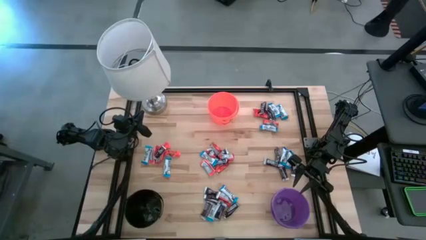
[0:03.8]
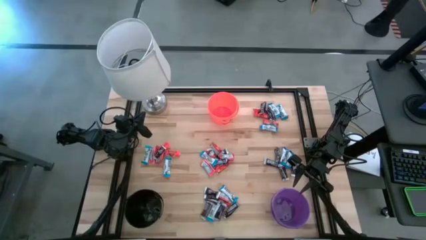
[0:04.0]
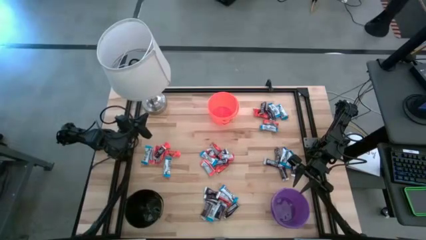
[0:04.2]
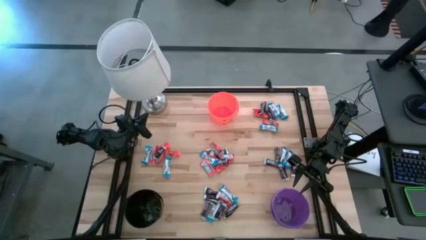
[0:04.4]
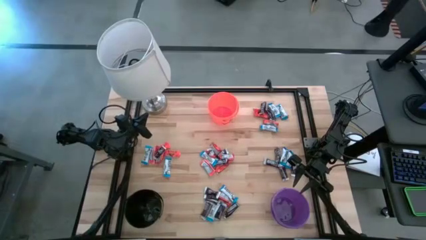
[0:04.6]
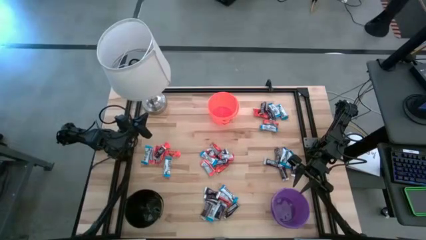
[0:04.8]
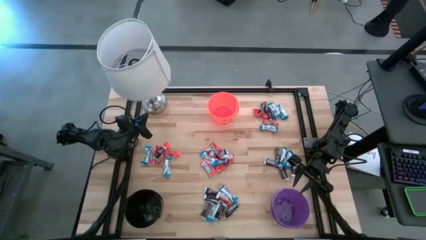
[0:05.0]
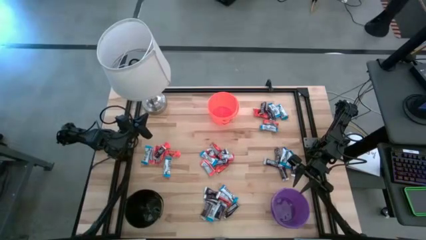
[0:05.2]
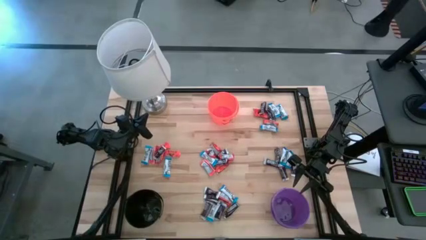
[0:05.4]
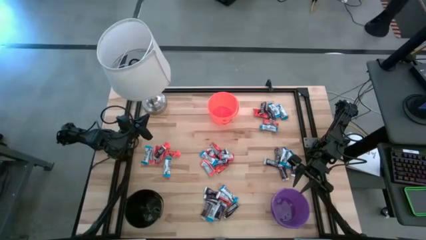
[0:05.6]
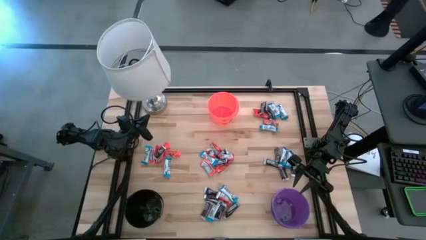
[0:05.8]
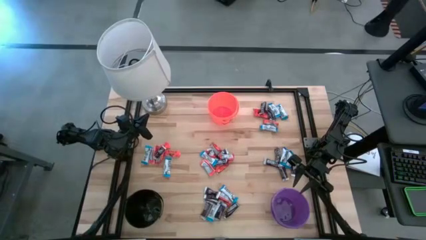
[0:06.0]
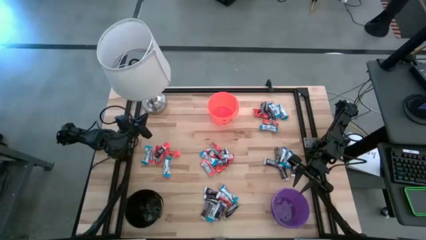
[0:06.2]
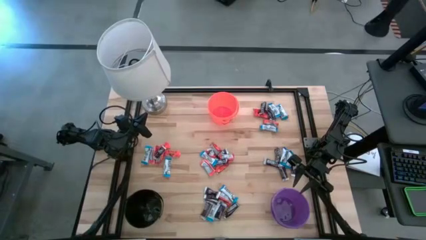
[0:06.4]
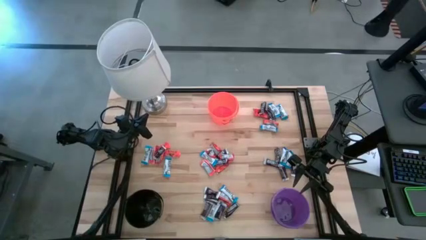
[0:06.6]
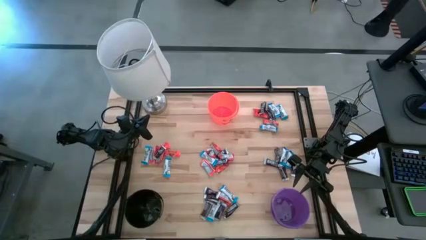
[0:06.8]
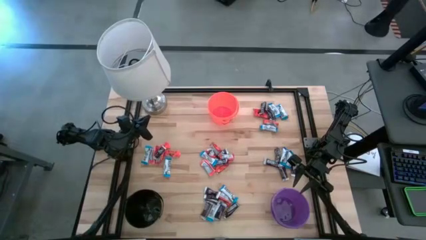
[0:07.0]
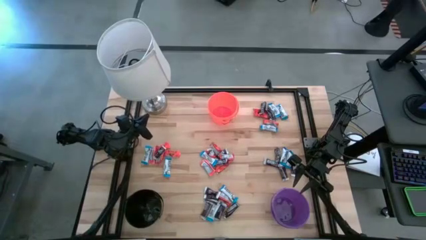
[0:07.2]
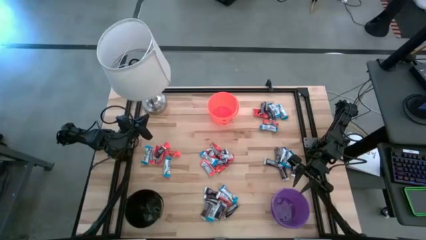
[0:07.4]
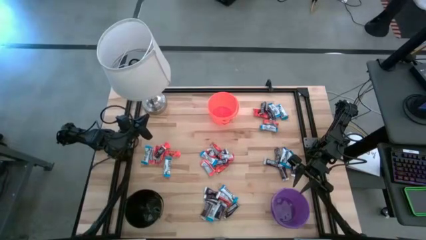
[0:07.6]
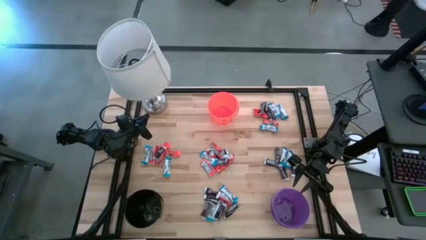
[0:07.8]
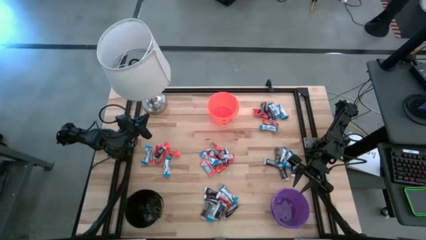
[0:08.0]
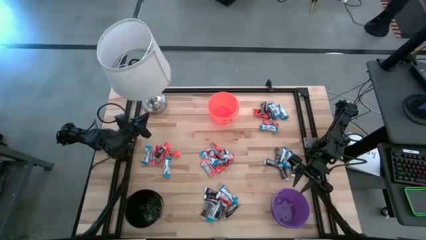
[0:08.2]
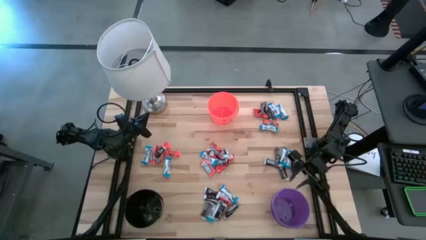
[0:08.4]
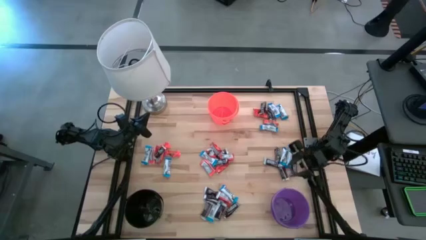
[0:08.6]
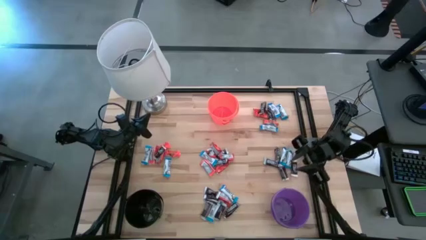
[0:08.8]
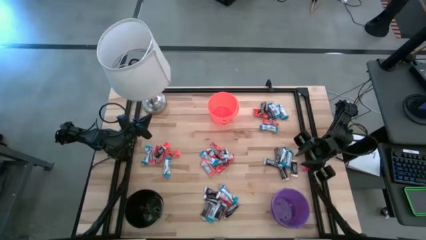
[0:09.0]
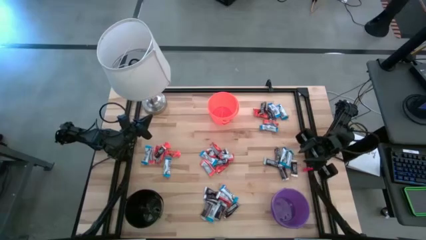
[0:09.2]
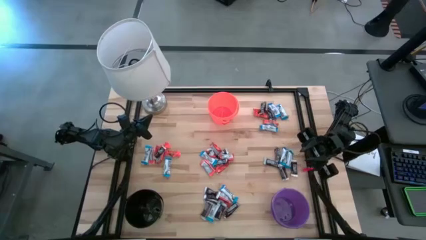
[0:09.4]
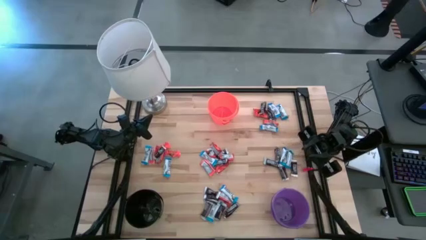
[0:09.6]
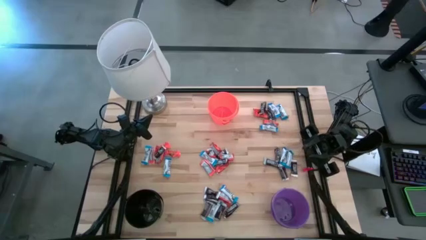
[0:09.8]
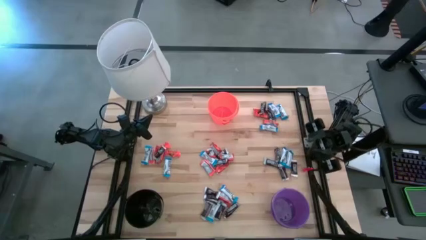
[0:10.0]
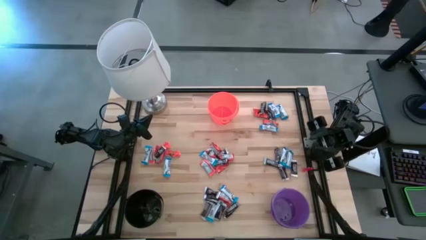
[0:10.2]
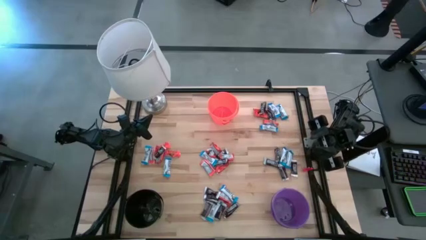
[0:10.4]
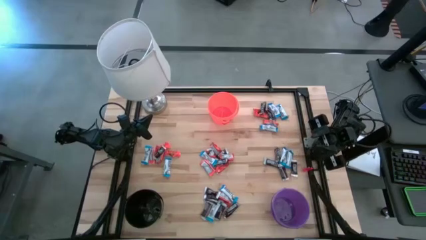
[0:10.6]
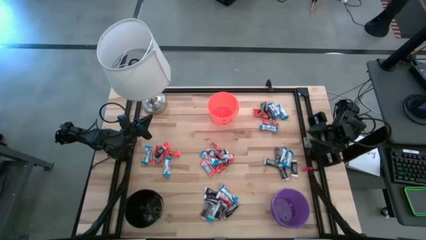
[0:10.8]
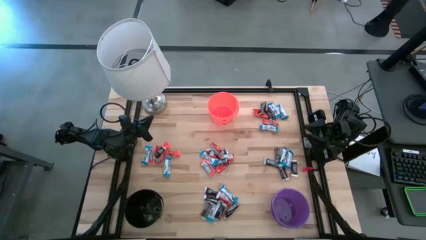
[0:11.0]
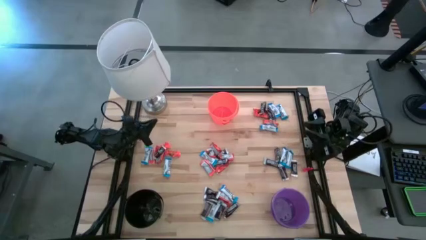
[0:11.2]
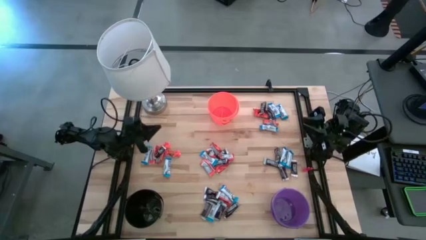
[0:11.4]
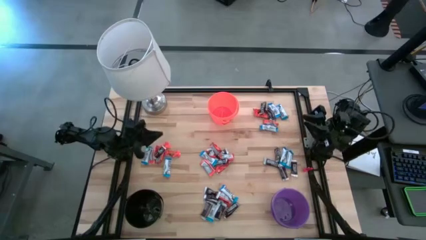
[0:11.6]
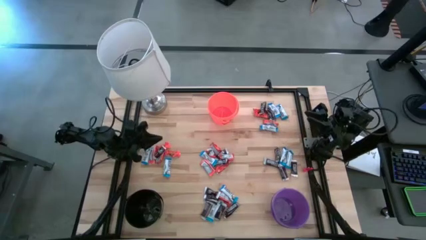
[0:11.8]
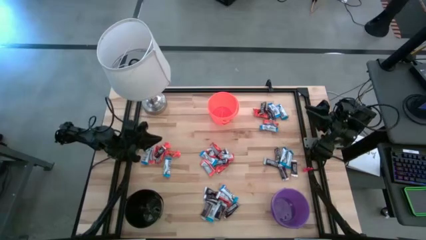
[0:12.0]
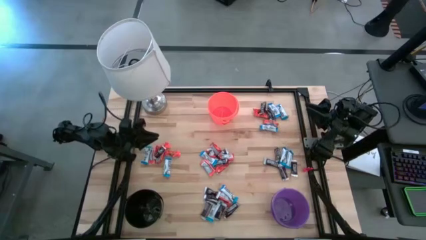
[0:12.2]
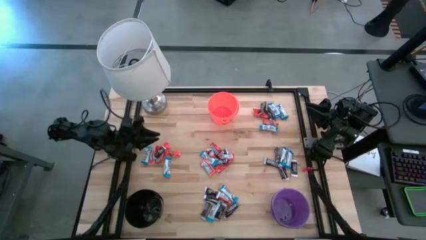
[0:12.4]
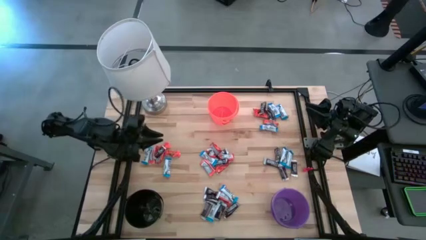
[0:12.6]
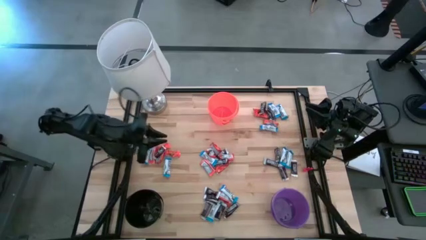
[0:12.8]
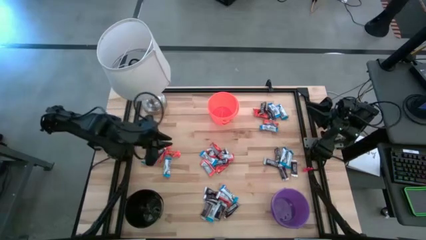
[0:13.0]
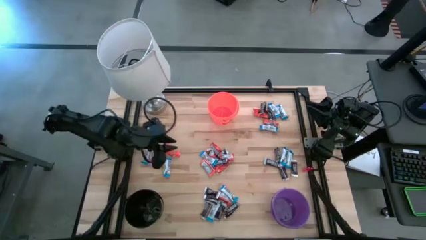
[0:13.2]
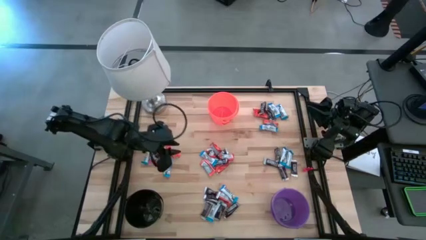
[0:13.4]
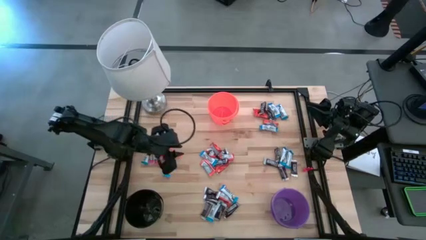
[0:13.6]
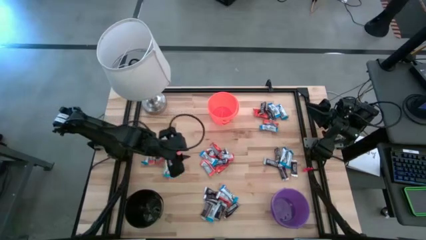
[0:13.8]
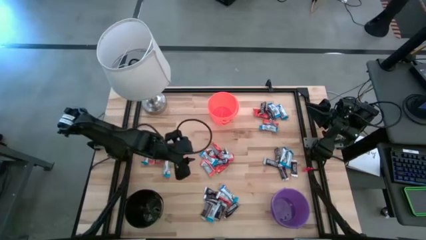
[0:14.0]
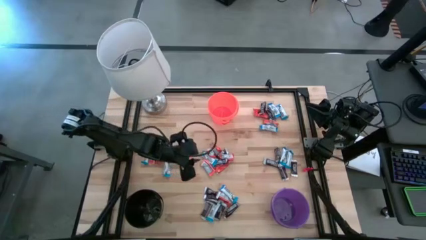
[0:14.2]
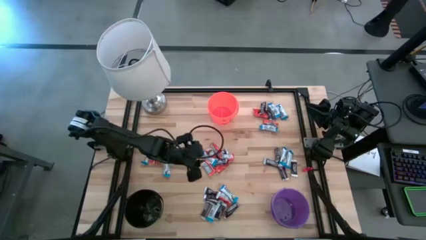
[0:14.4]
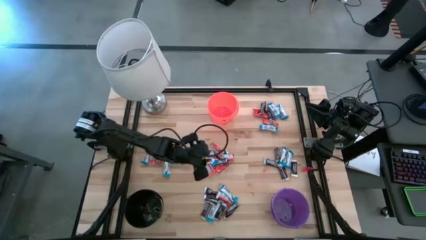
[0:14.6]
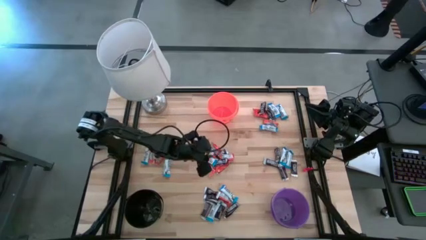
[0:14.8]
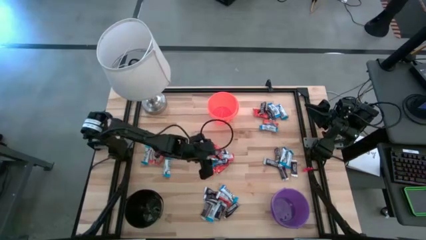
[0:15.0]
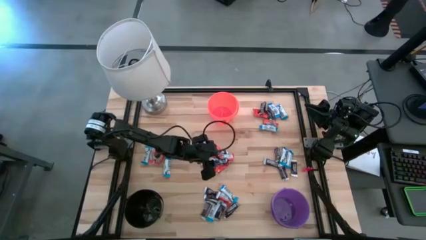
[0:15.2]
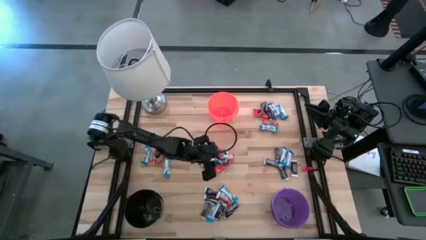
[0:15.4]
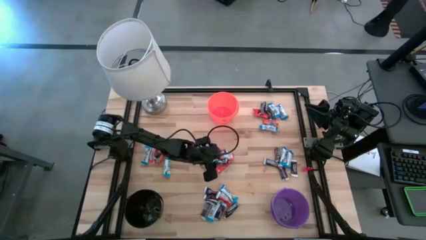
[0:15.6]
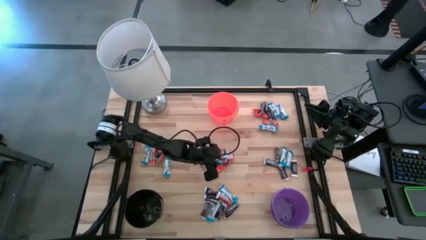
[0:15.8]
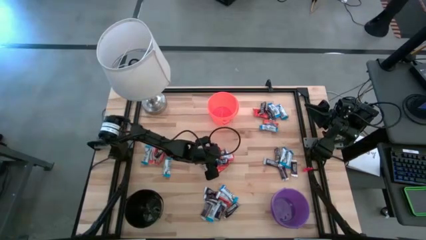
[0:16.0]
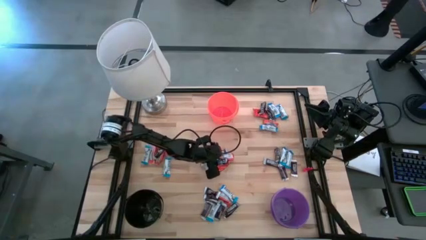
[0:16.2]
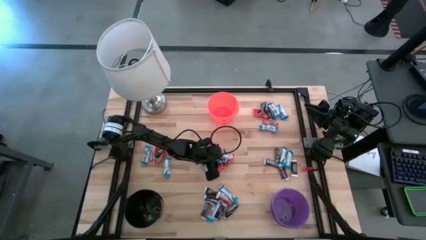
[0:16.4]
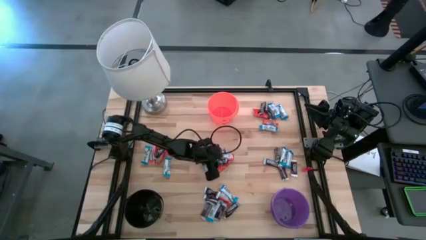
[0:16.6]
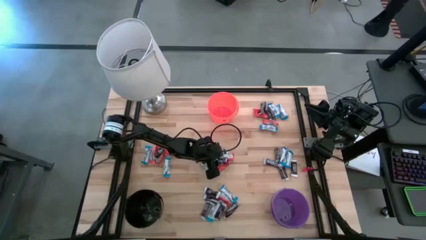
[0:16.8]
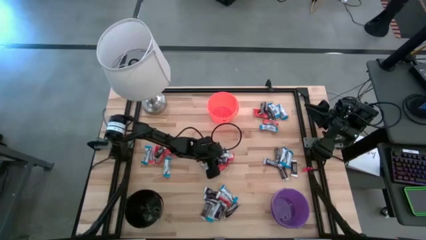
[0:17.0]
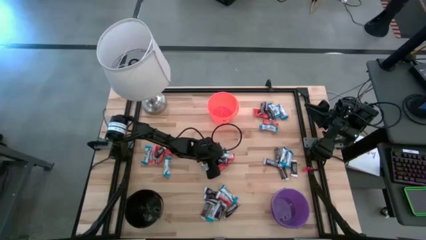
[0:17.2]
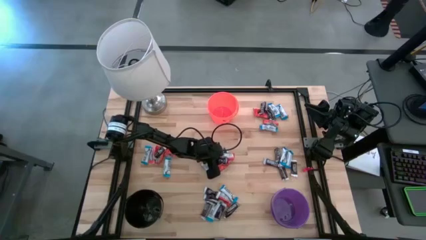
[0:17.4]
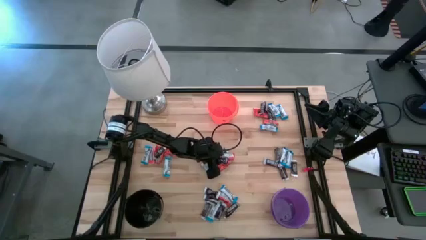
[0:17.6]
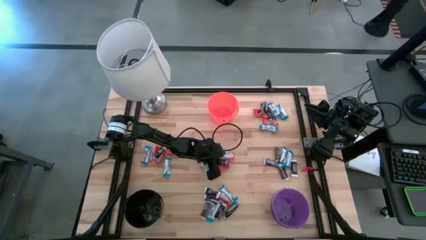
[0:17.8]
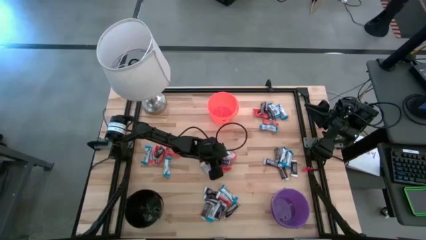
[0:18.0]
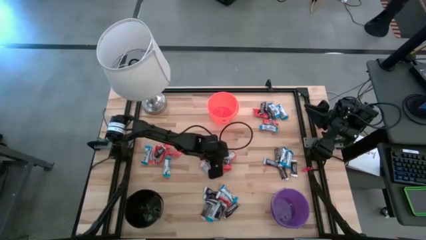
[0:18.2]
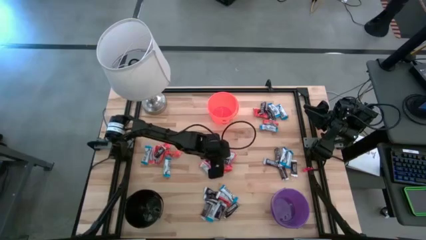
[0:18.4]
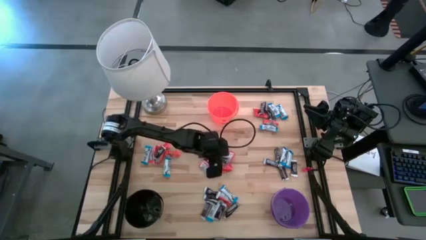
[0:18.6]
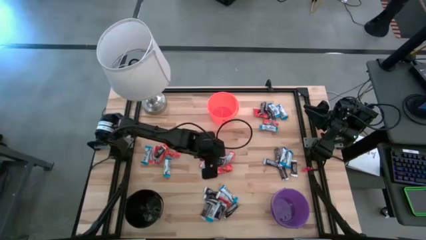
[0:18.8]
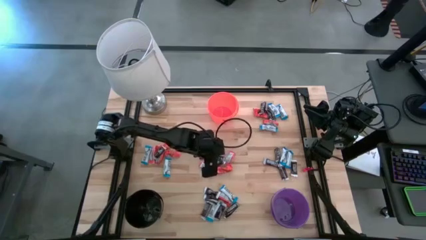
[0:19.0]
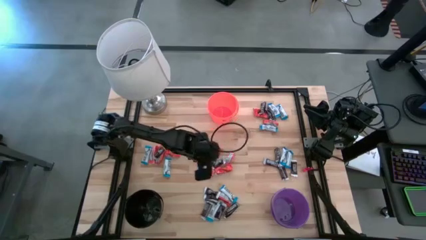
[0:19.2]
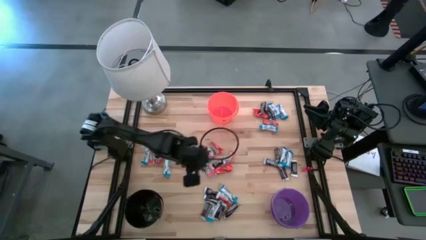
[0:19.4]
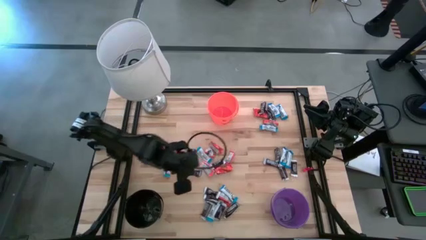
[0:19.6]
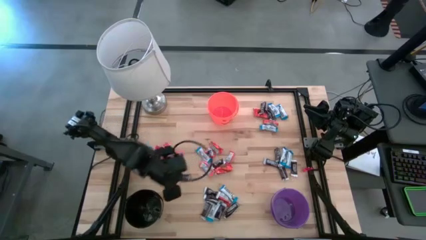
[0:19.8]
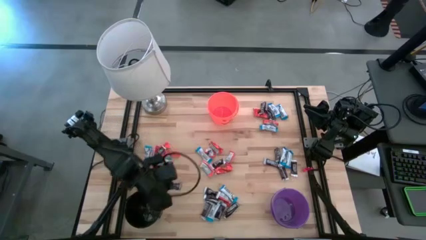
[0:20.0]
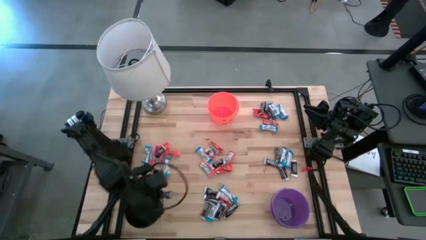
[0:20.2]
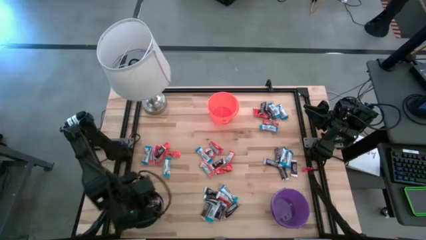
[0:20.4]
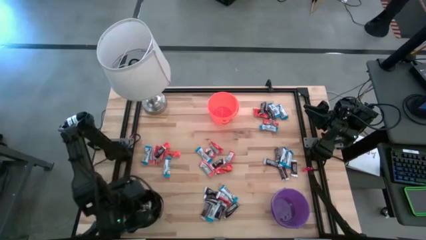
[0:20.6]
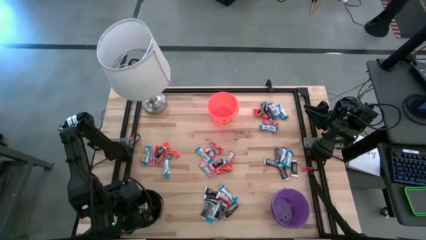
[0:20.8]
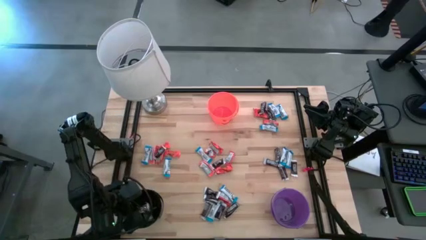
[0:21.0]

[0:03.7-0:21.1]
Task: Organize candy in baskets
Put the brown chocolate into the black bucket
